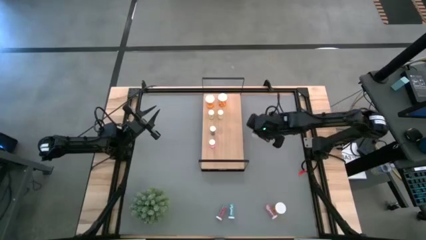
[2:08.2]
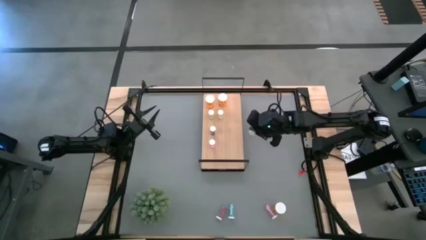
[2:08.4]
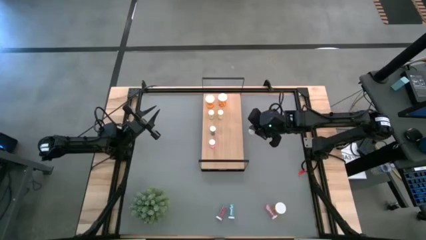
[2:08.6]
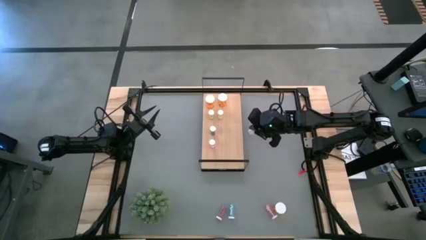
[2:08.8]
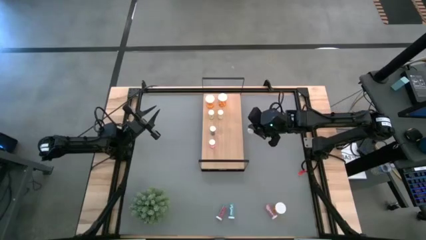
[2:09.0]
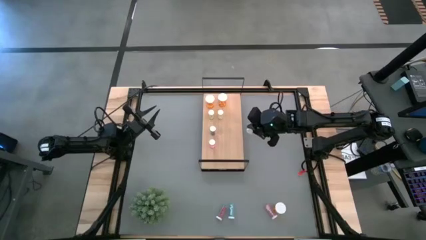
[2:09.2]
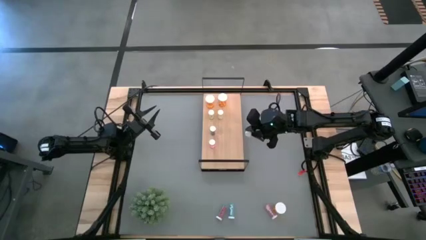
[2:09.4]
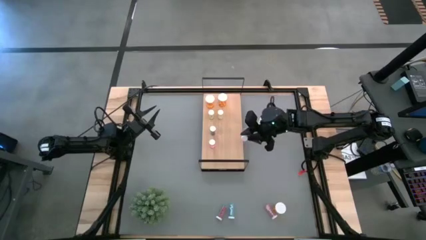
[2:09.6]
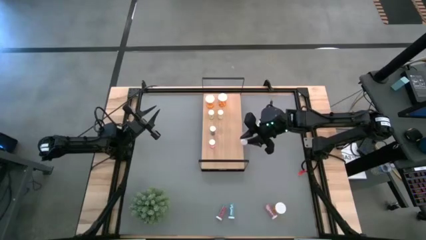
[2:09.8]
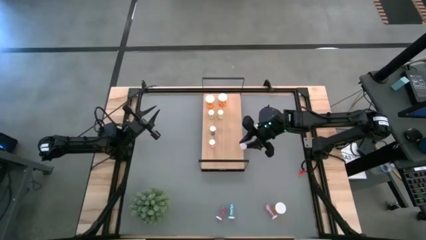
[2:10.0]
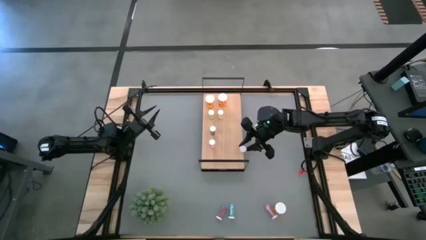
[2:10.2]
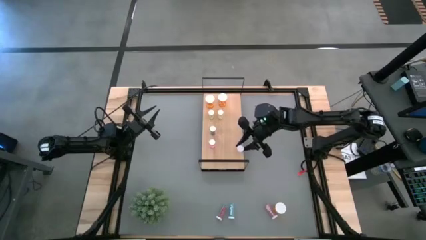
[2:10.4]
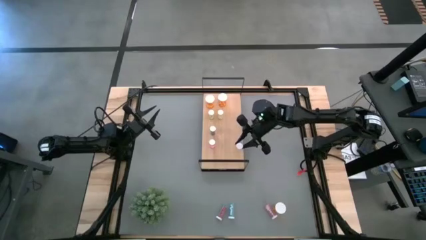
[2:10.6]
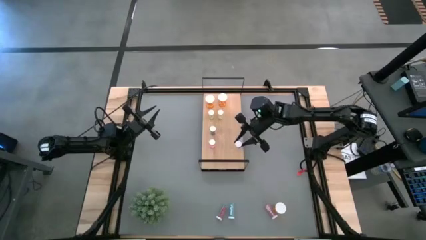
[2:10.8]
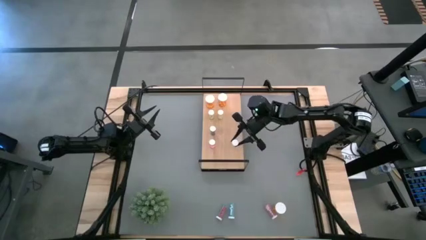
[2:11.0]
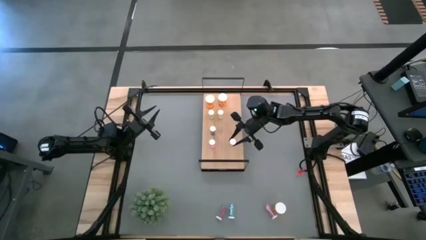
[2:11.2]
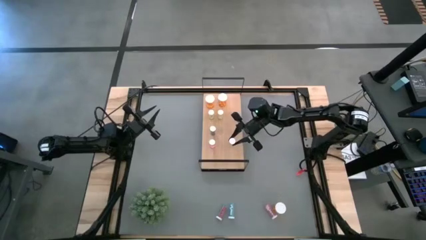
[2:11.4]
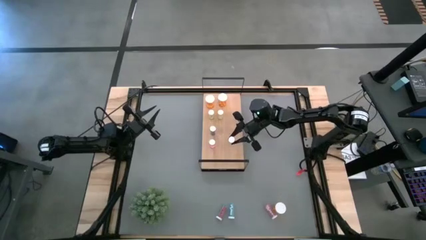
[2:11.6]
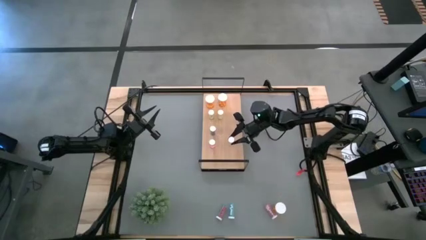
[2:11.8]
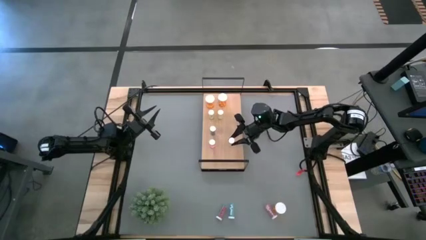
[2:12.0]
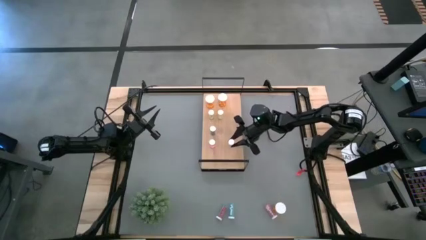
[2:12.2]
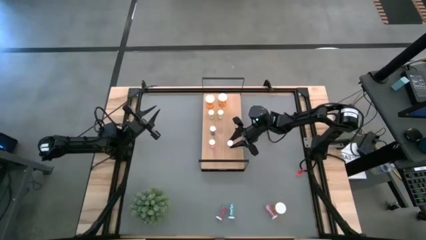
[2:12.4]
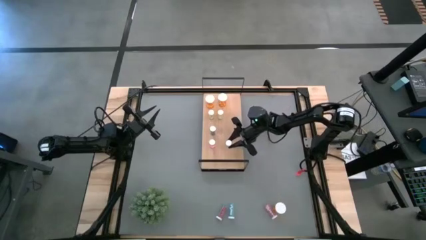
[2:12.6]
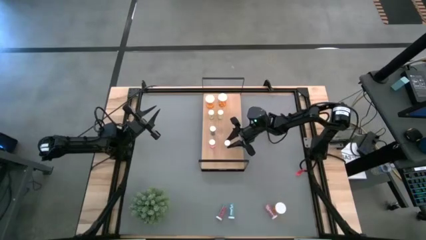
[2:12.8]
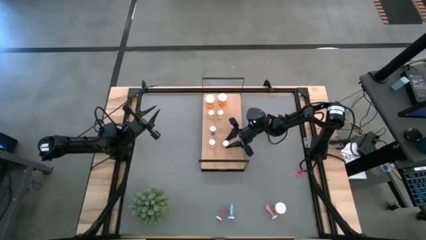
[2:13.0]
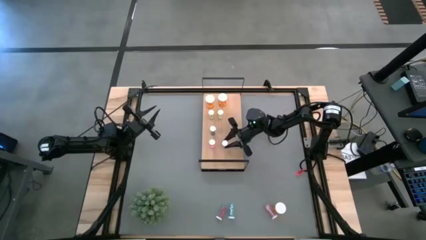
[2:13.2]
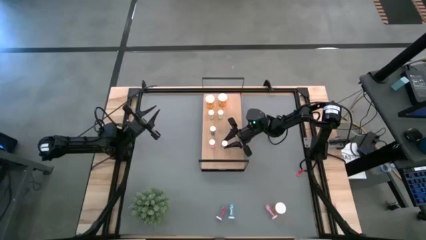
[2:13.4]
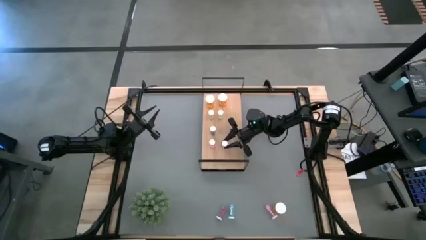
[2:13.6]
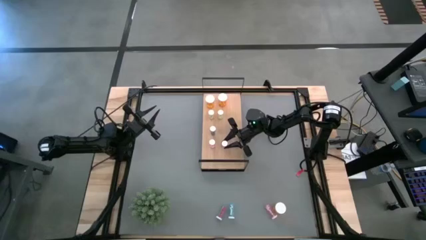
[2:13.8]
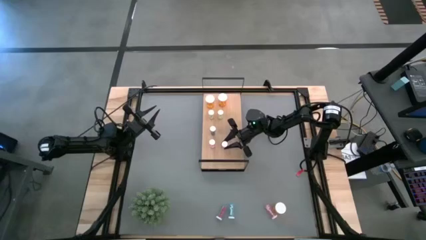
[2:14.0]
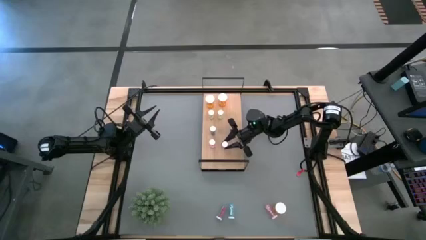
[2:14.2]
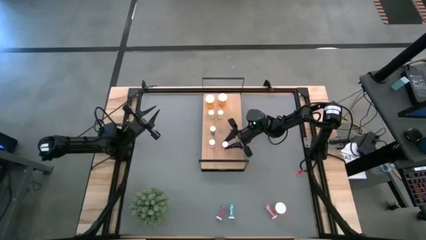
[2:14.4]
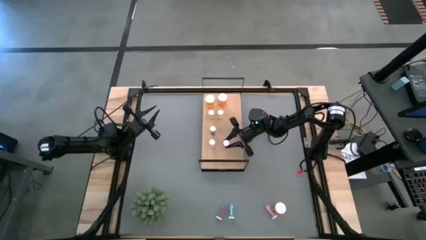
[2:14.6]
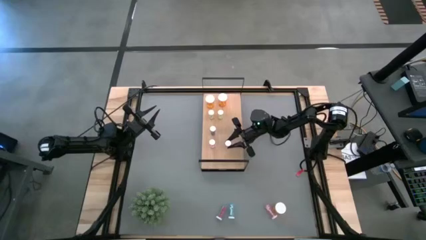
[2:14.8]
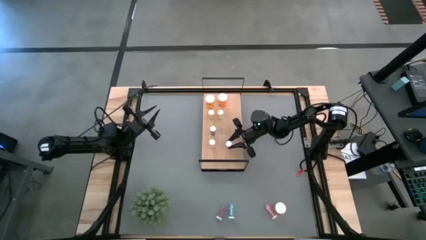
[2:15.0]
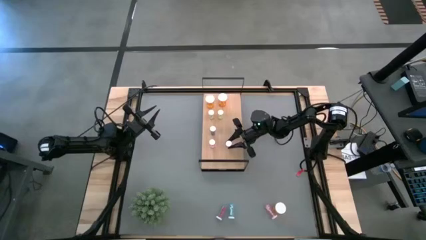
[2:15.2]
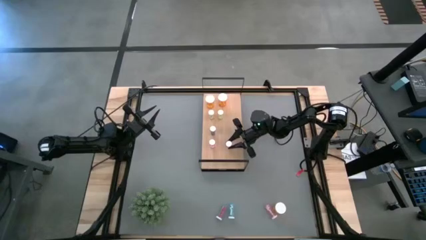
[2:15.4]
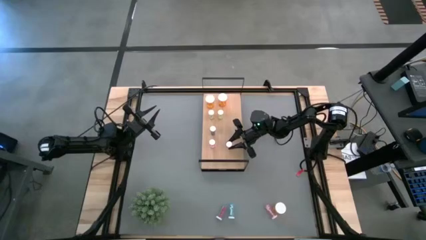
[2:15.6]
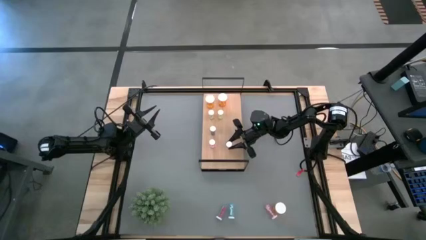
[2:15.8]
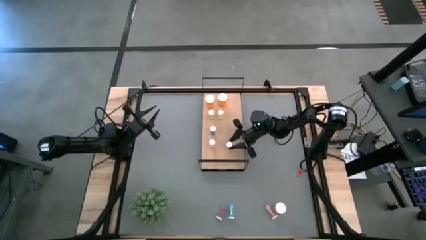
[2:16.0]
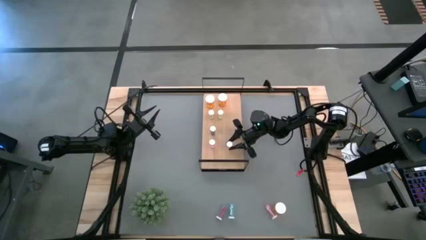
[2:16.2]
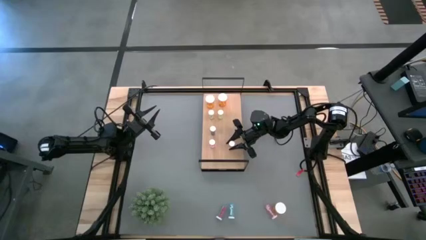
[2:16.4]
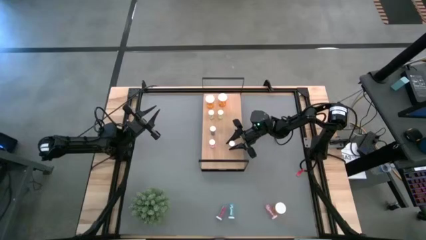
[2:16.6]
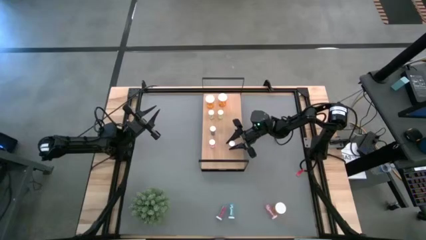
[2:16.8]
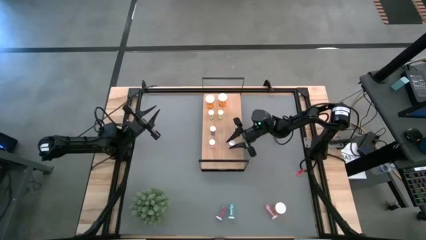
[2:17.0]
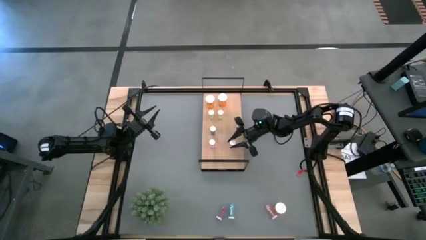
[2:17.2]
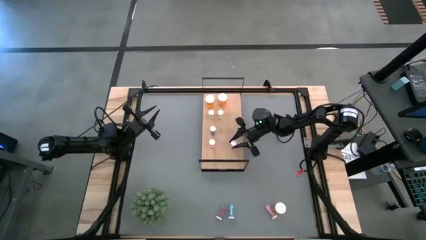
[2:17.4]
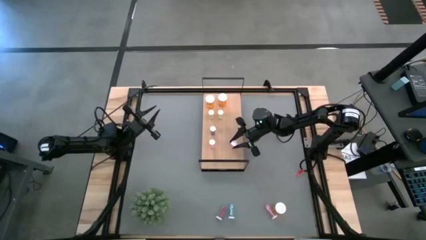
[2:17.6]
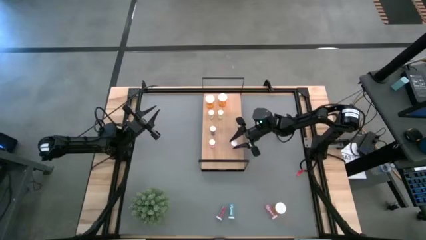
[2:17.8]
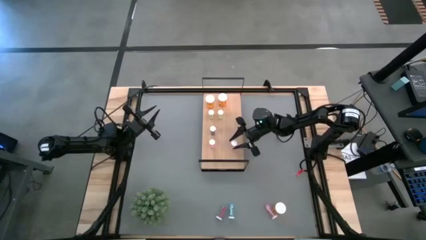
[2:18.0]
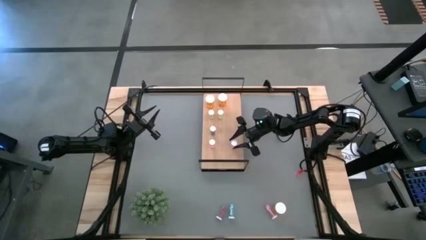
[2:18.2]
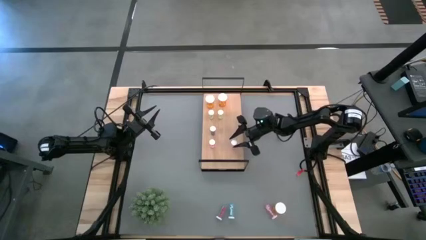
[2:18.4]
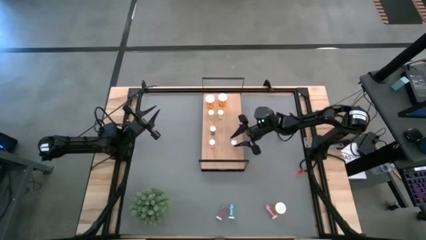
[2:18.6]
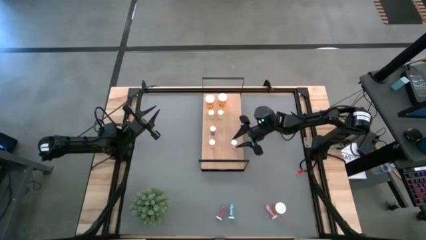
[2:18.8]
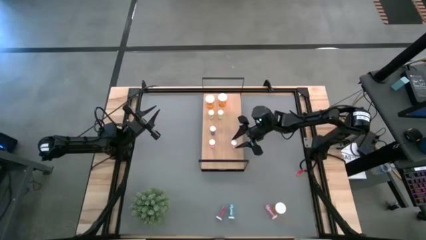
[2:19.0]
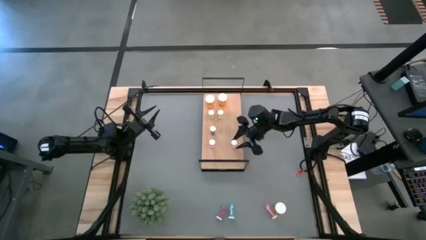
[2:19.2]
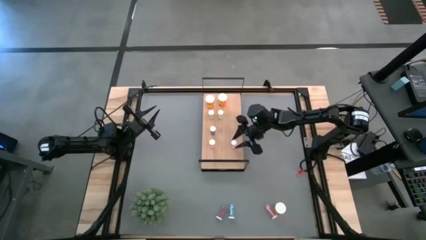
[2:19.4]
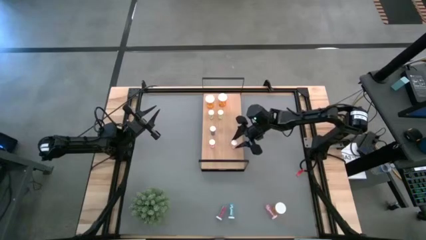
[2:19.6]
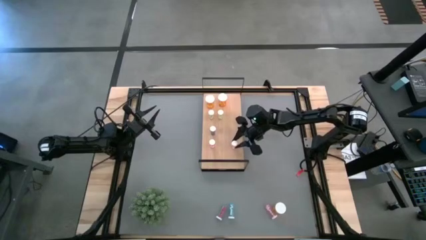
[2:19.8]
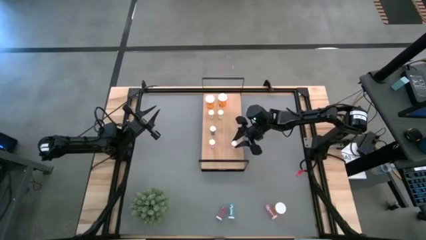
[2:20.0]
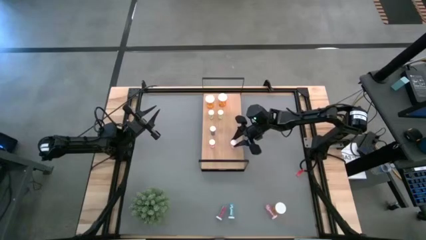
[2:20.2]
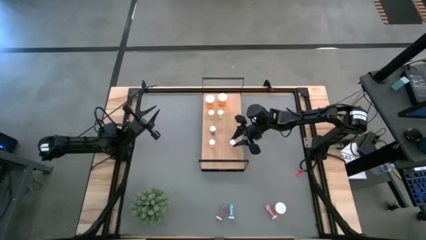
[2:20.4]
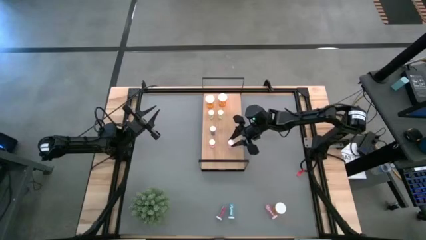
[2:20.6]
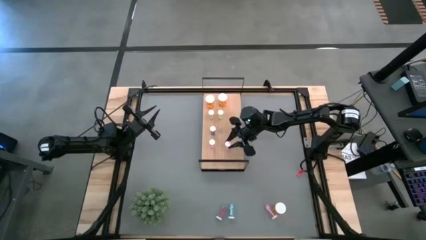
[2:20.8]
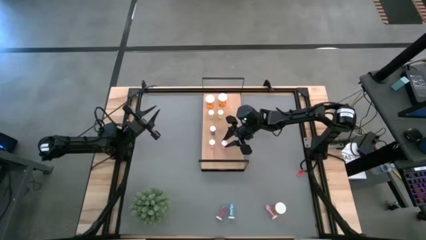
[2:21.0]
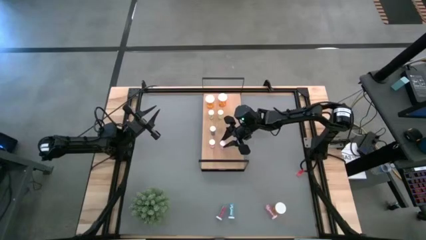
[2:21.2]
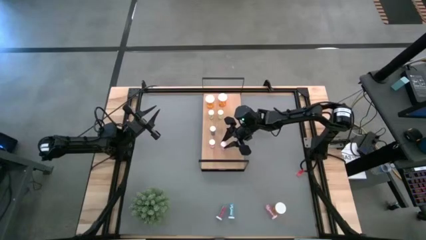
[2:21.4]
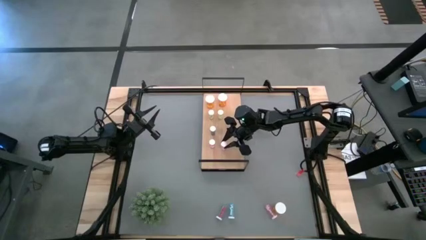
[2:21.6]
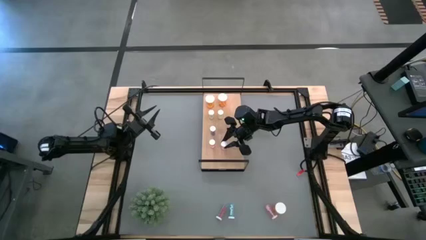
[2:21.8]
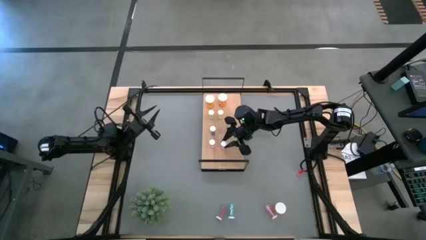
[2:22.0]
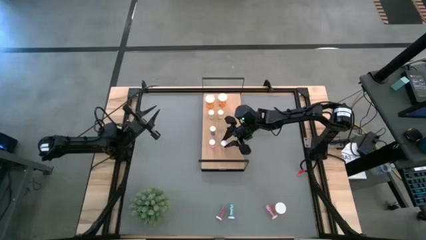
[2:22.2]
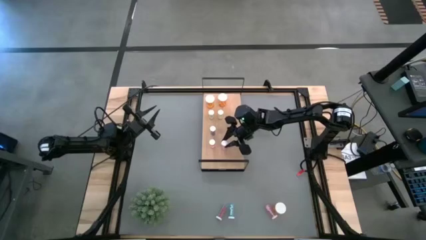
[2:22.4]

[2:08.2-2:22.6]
Task: Pick and place medicine bottles onto shelf by color
Put the top pink pill bottle on the shelf aligned with the other pink bottle
